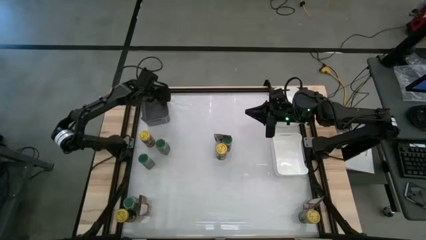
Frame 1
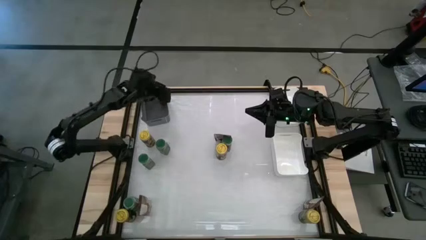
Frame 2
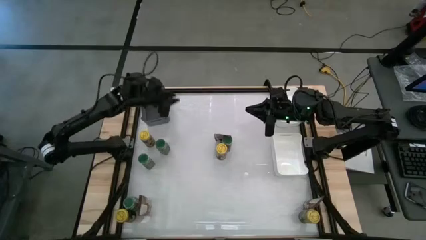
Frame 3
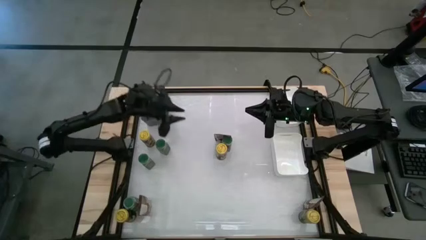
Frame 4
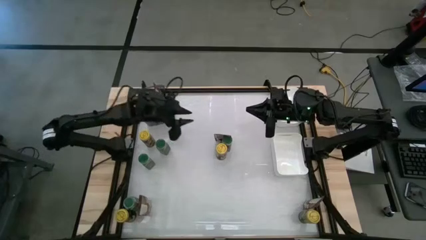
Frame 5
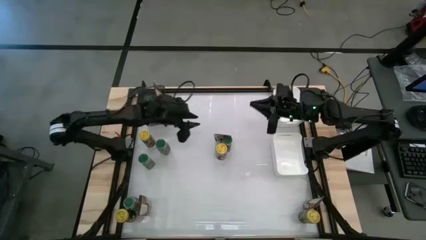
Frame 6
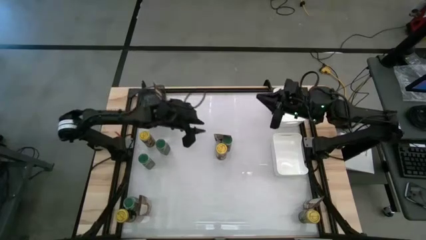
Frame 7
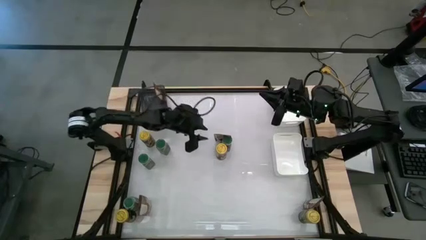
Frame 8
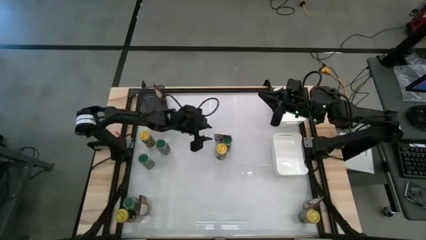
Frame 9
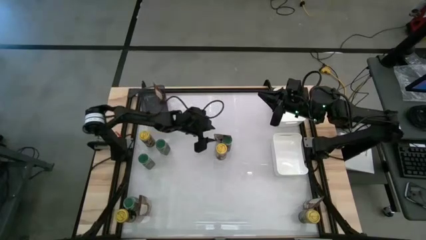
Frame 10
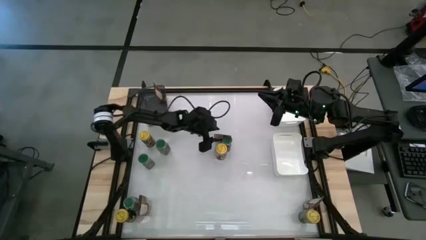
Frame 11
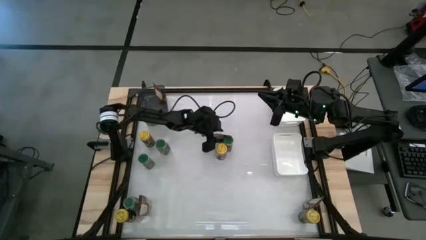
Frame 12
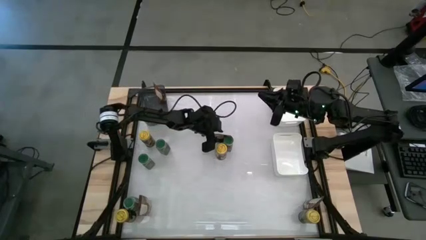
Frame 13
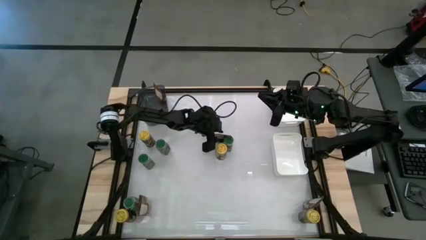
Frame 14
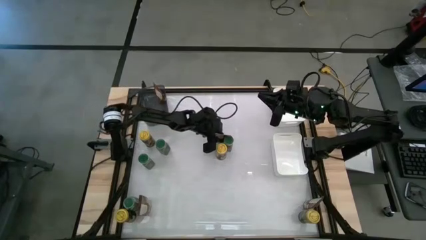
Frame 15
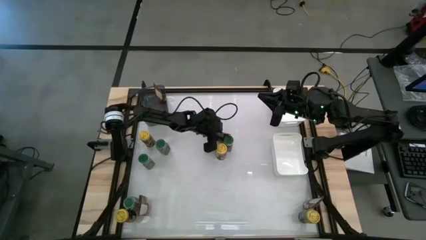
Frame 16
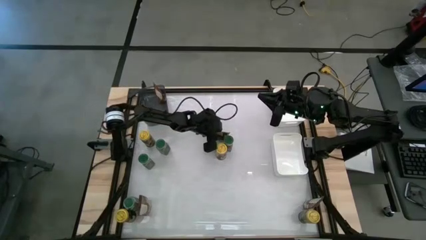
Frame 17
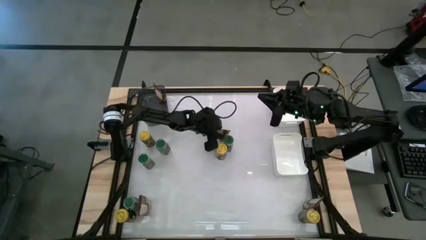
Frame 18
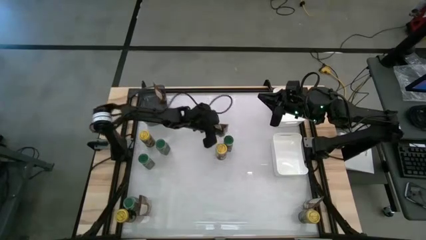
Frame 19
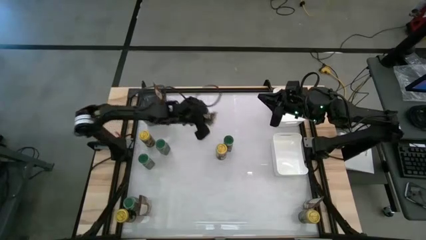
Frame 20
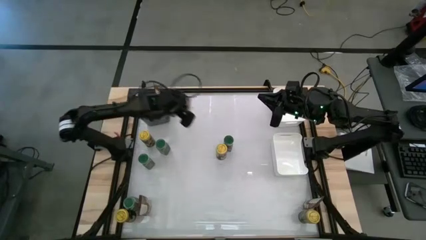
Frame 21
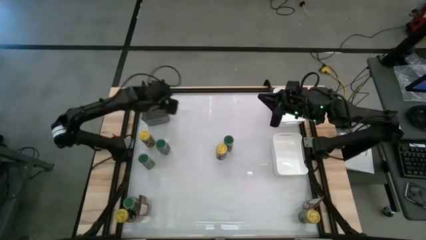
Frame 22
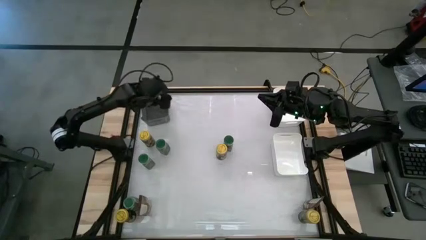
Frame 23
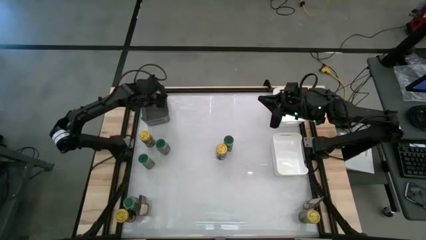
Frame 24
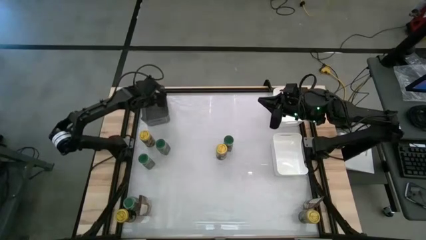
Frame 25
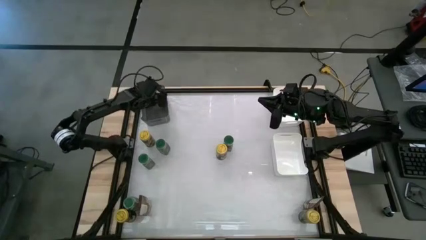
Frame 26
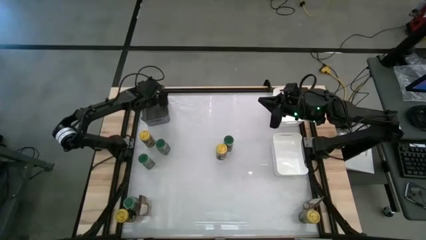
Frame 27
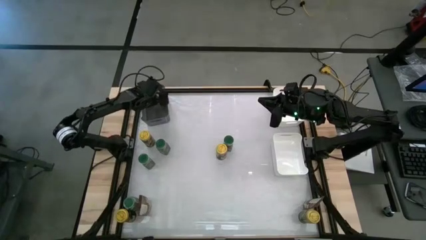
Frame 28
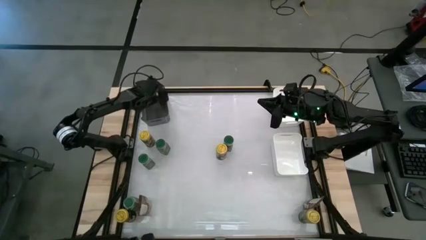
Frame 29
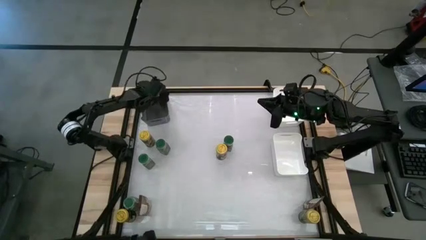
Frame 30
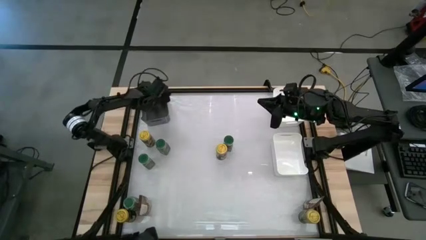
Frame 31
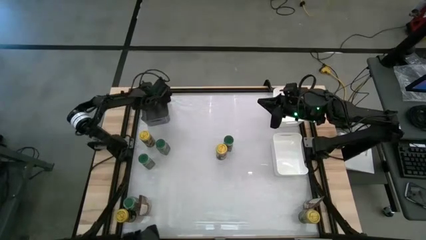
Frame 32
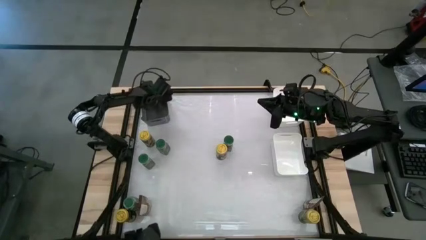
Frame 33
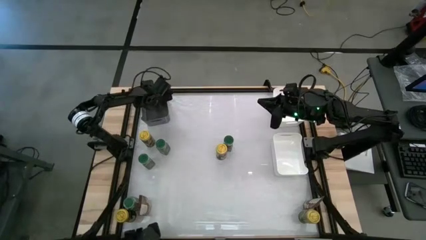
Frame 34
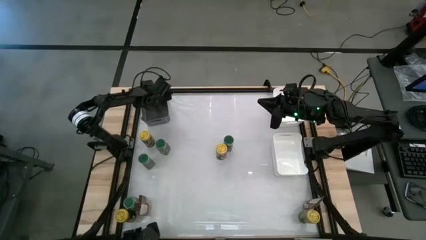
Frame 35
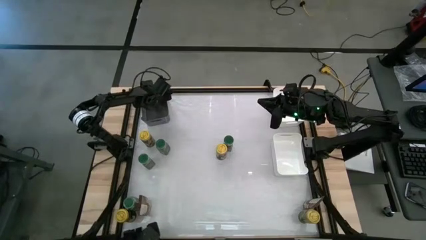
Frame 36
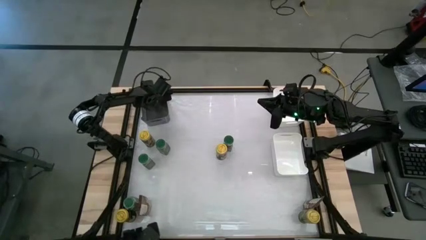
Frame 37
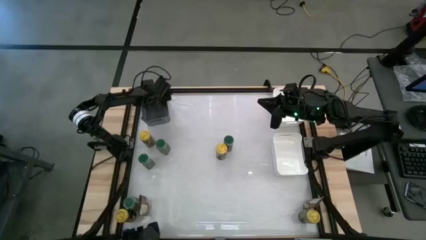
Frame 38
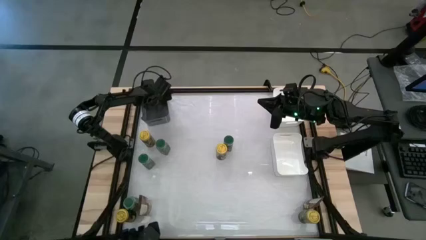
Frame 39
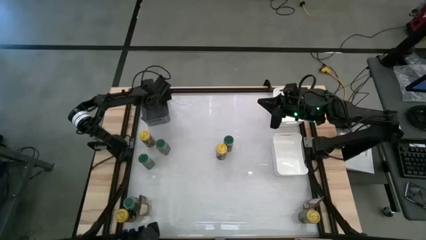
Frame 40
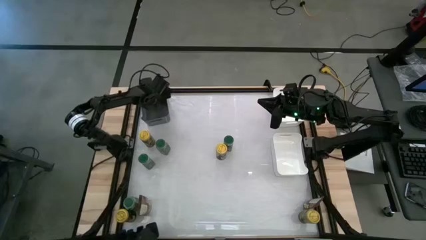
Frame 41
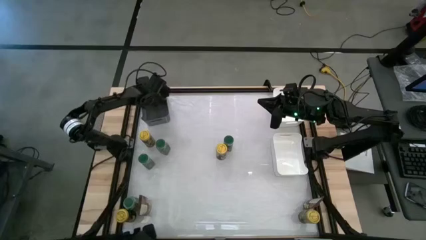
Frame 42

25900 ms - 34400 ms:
Task: Sort spices by type
Put the orange seasoning bag into the black bin

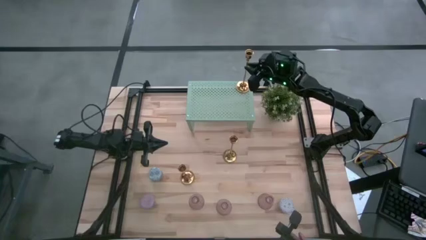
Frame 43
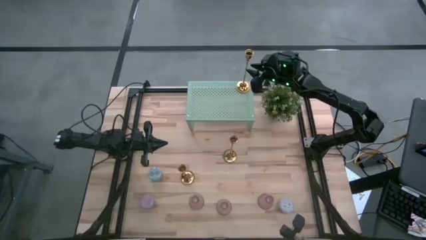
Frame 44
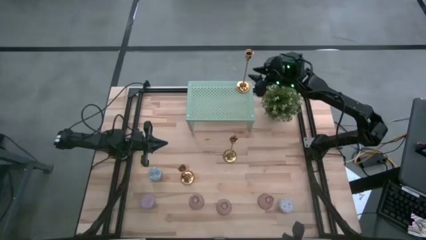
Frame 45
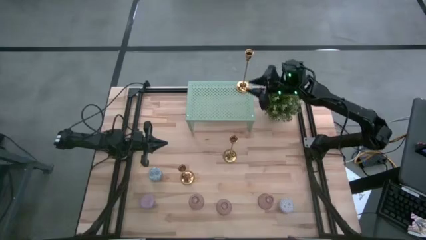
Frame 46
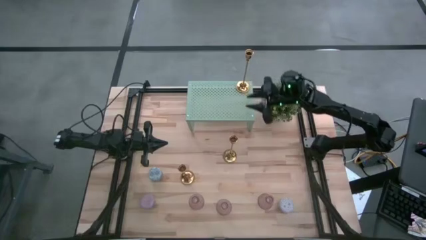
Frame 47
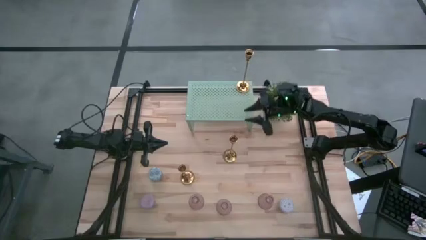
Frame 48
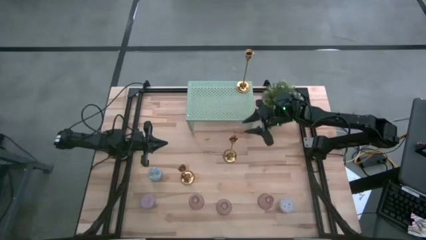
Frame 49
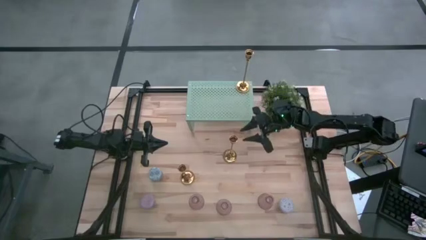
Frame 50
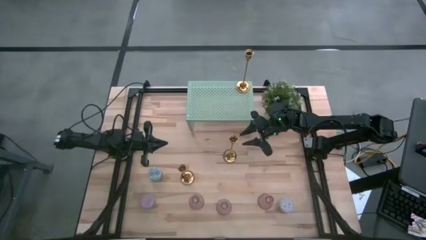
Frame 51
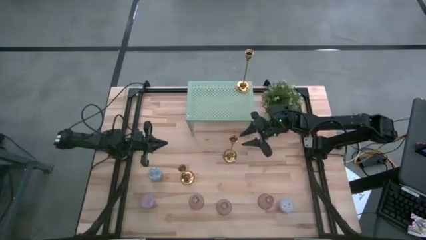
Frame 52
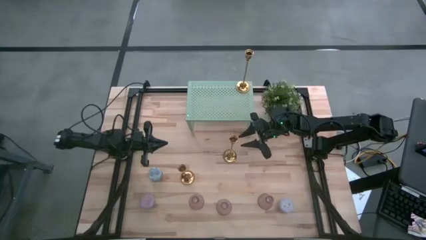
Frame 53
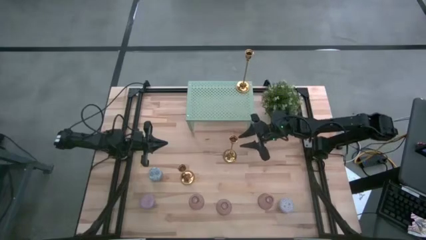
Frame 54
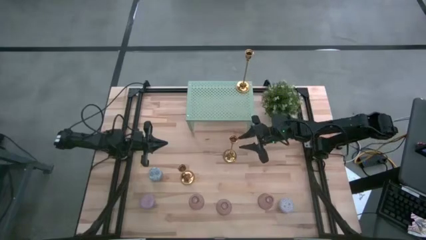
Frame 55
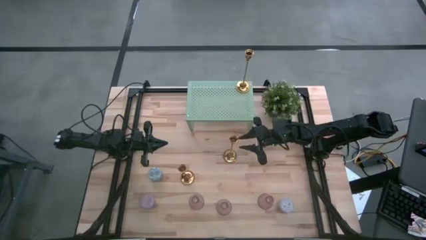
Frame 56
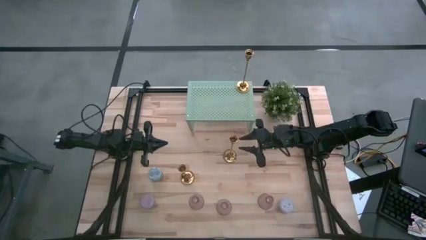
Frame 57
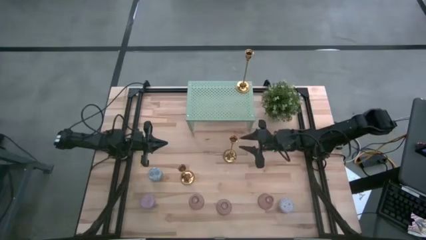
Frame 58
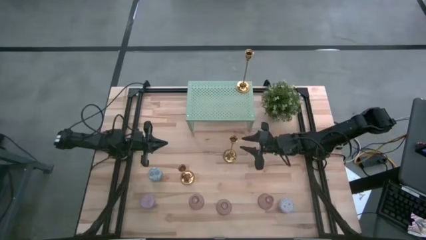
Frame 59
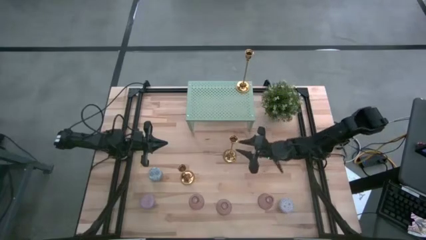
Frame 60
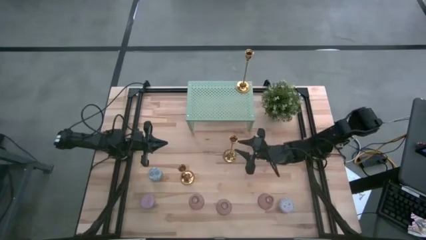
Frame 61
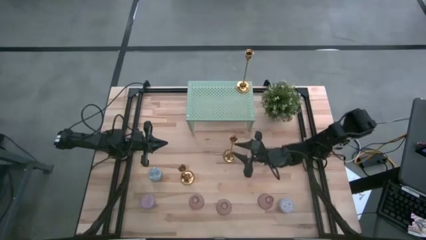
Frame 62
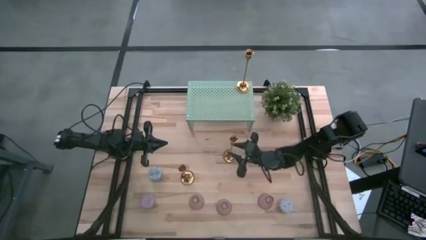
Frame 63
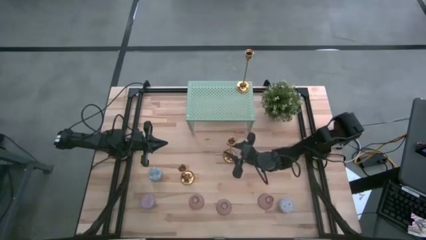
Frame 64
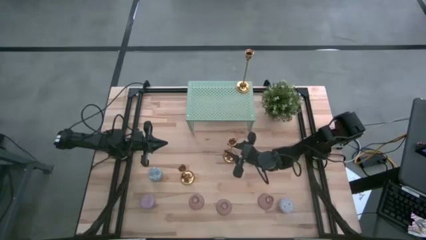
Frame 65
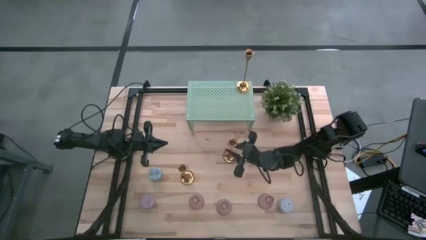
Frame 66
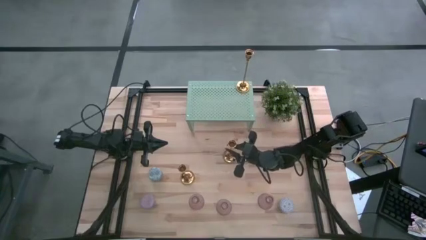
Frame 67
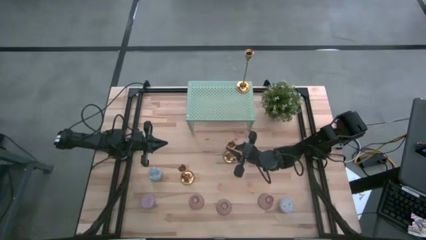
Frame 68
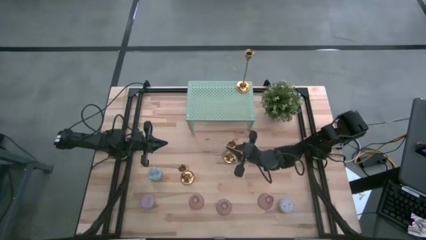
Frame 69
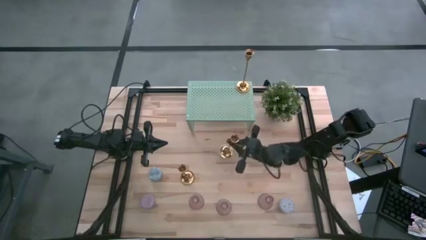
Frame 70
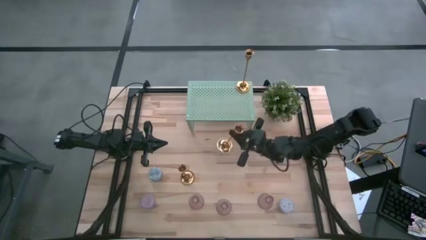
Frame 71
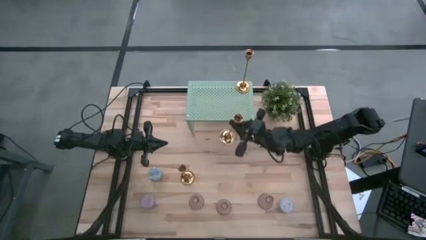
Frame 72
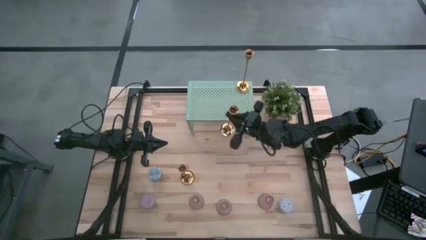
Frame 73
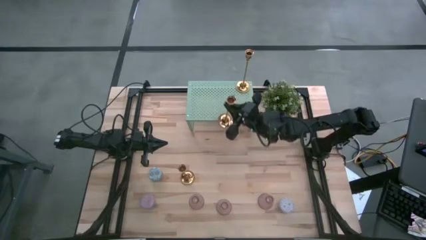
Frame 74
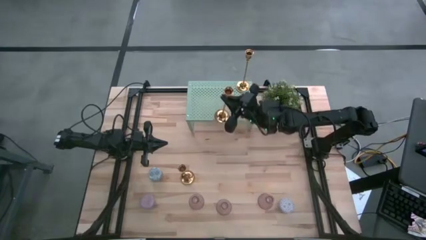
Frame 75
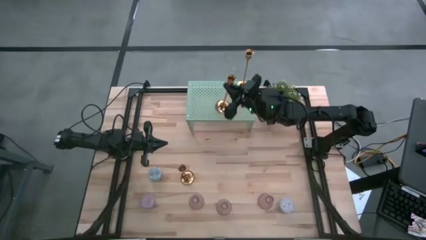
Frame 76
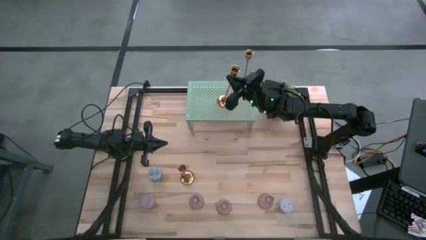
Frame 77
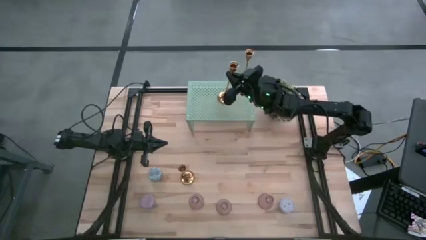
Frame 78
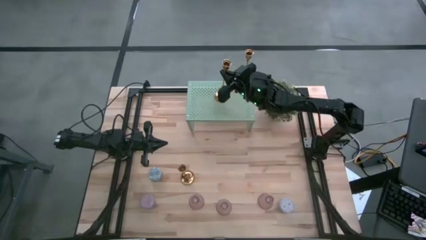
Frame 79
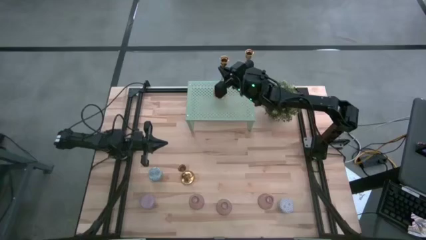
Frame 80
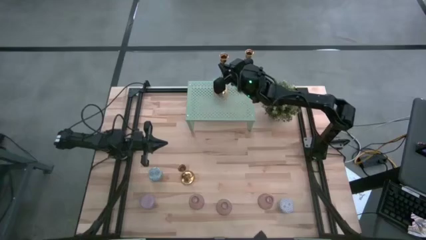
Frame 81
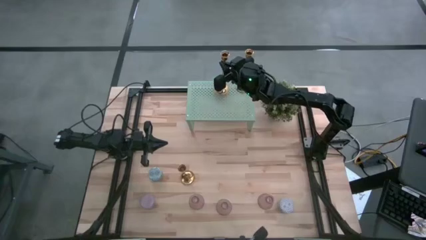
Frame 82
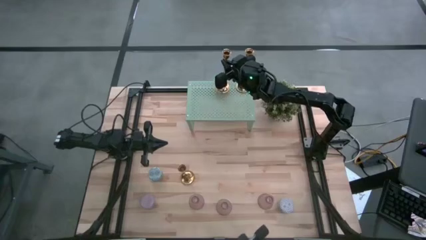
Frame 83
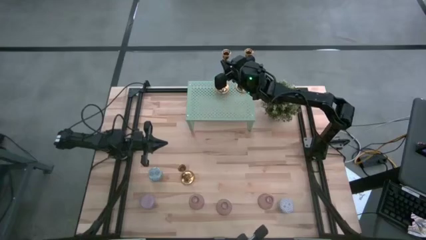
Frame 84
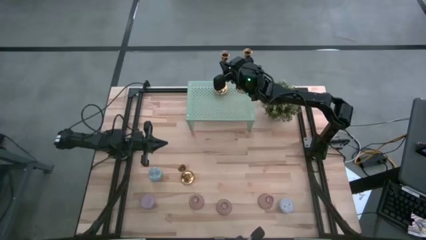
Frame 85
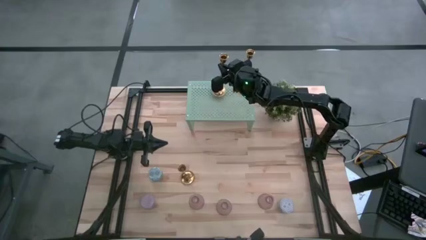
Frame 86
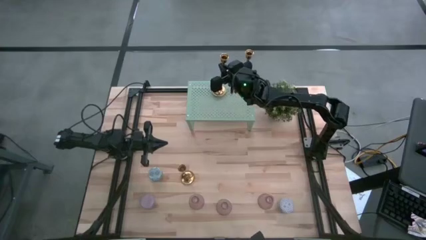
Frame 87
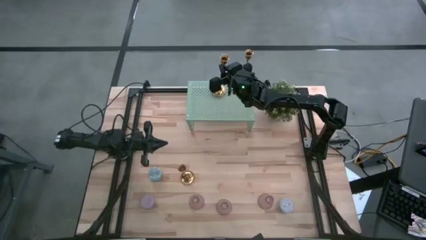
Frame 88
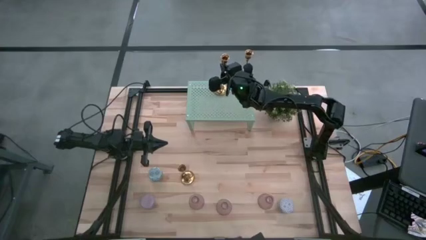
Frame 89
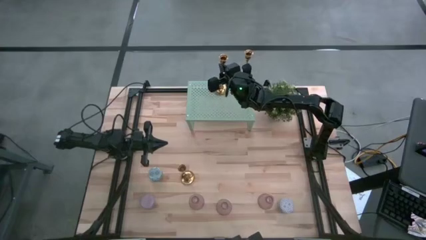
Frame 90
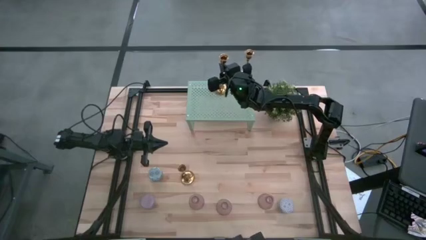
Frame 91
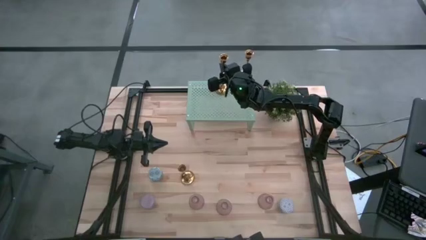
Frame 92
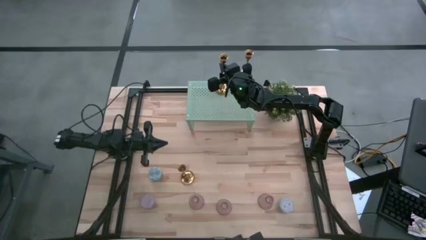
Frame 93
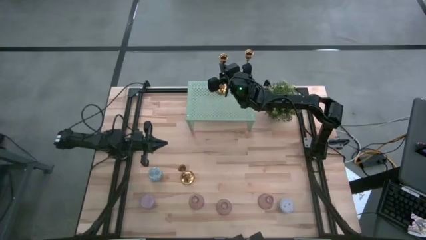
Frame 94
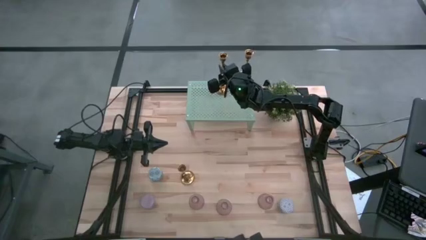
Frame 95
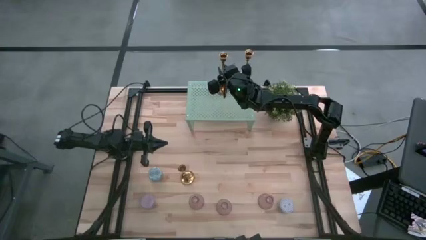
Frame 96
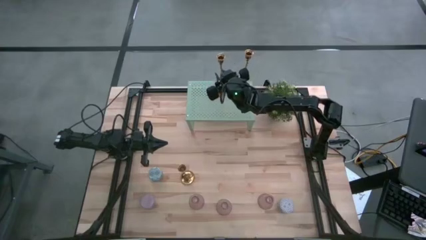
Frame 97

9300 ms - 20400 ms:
Task: Pick & Place candle stick holders
Put the top gold candle holder on the shelf aligned with the other gold candle holder
